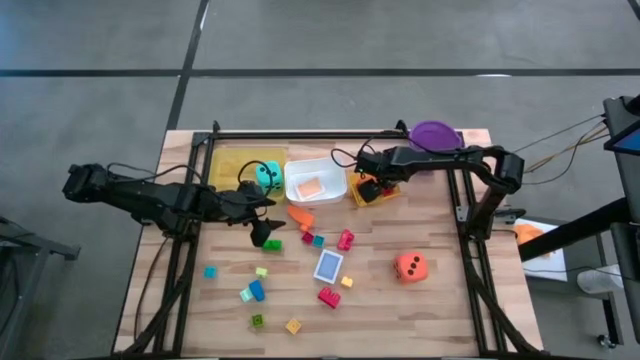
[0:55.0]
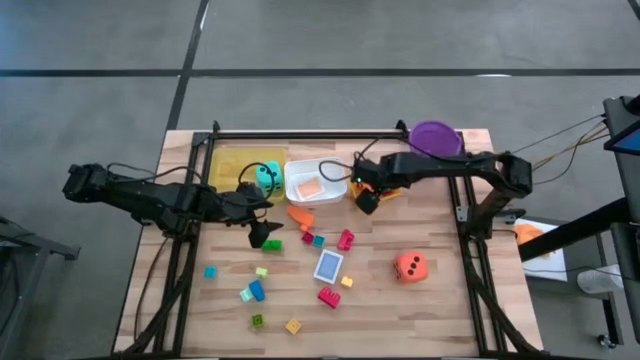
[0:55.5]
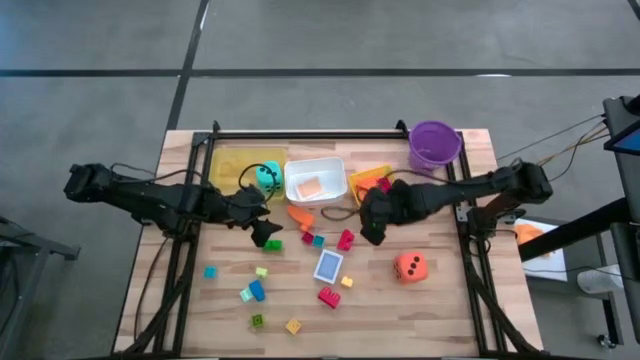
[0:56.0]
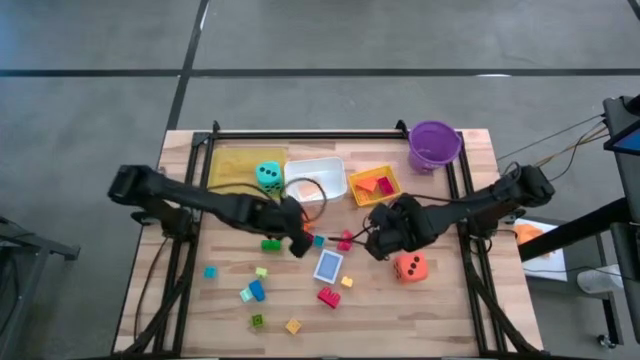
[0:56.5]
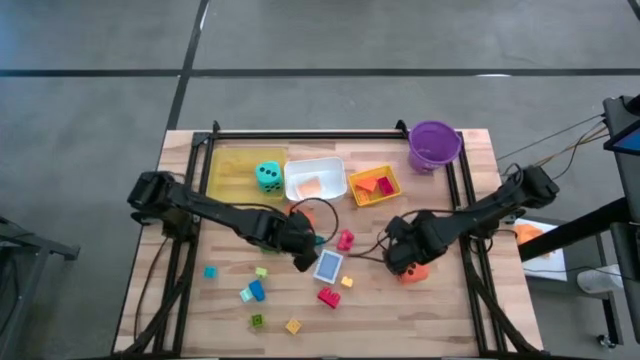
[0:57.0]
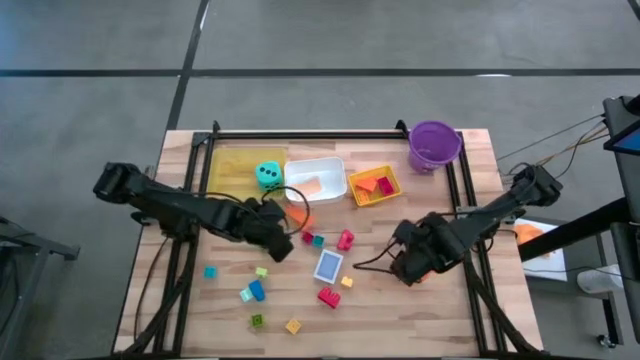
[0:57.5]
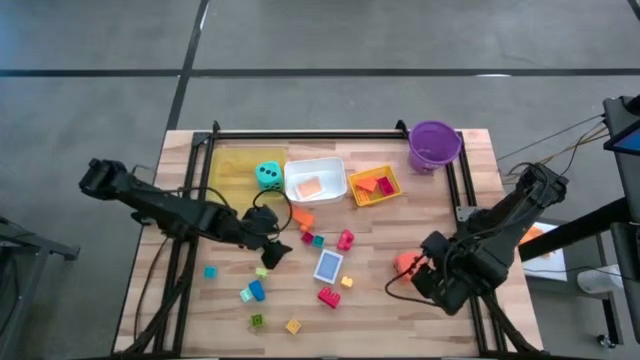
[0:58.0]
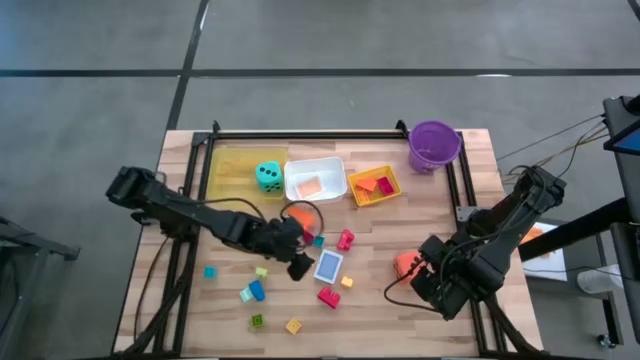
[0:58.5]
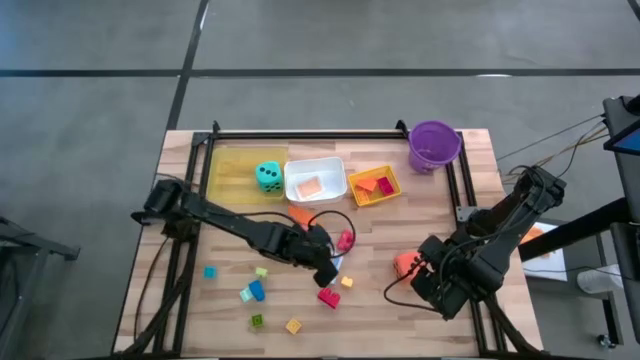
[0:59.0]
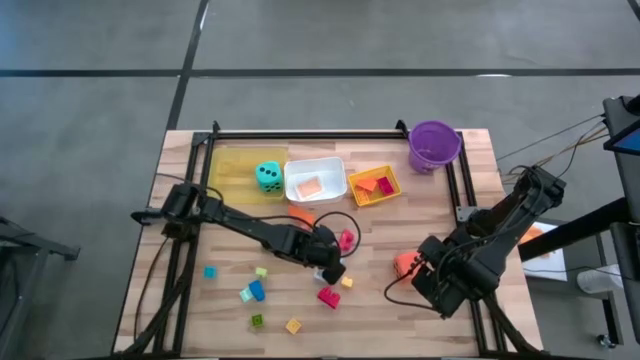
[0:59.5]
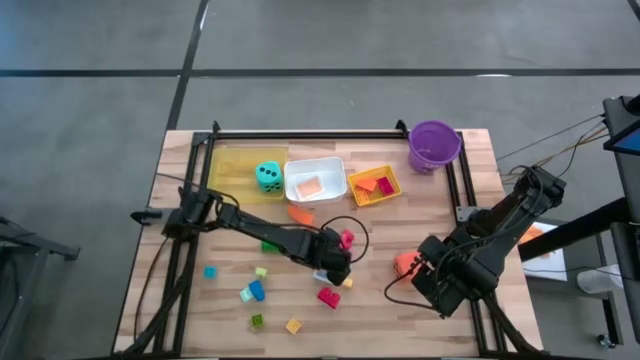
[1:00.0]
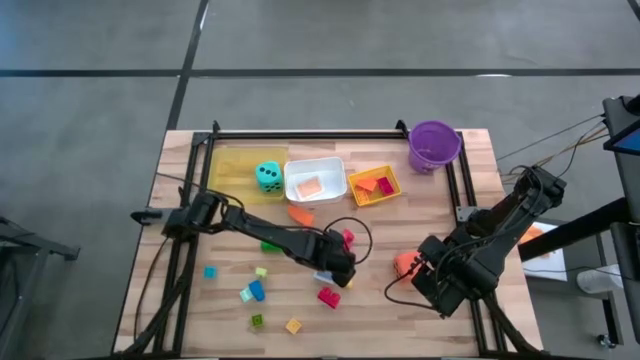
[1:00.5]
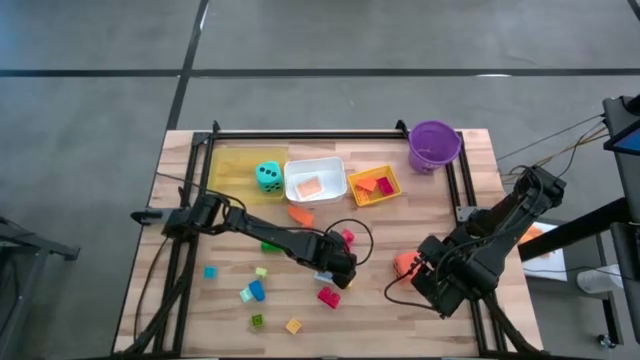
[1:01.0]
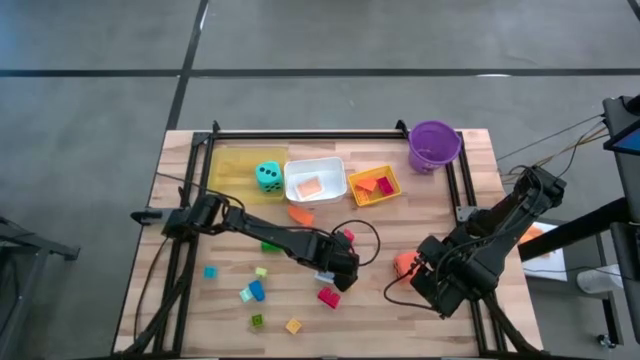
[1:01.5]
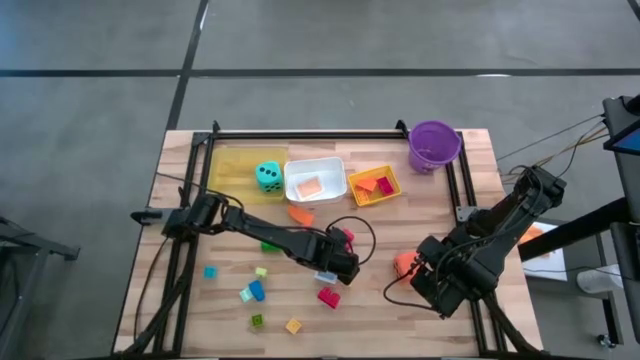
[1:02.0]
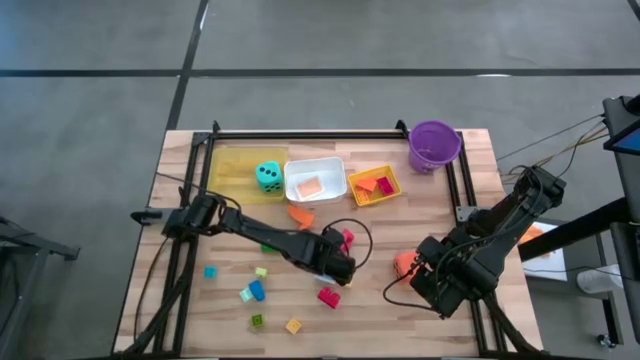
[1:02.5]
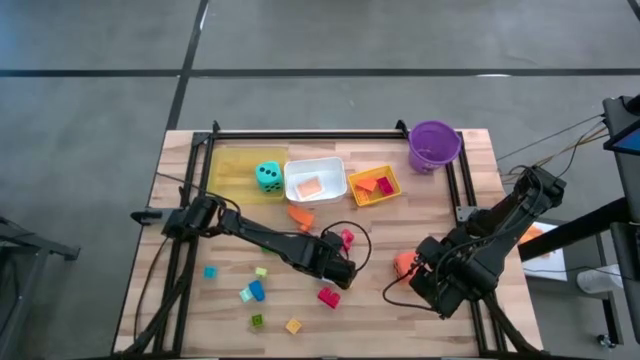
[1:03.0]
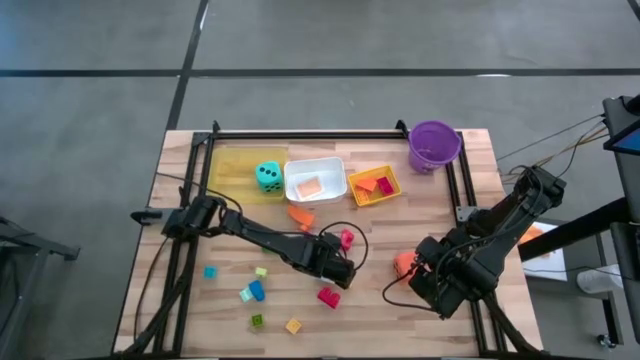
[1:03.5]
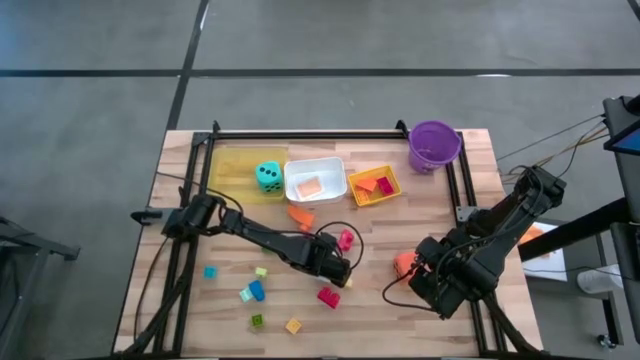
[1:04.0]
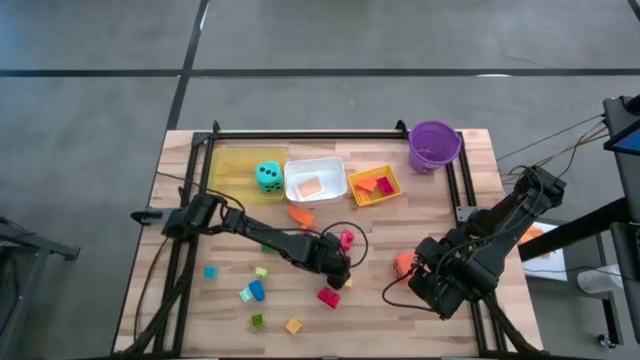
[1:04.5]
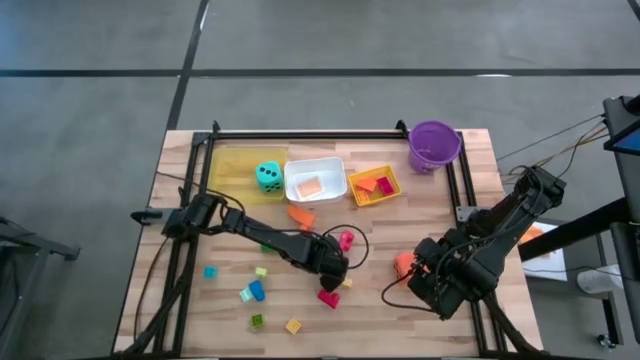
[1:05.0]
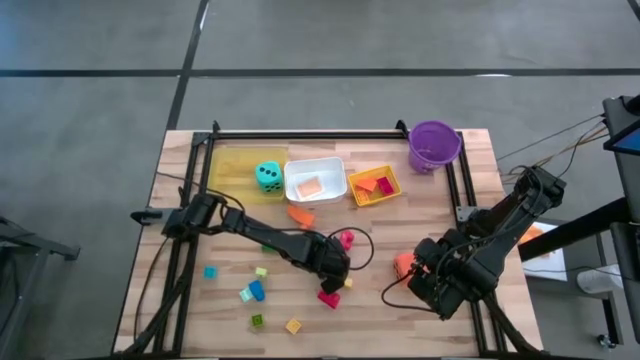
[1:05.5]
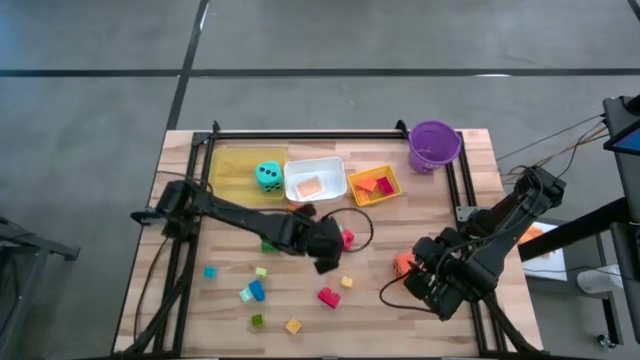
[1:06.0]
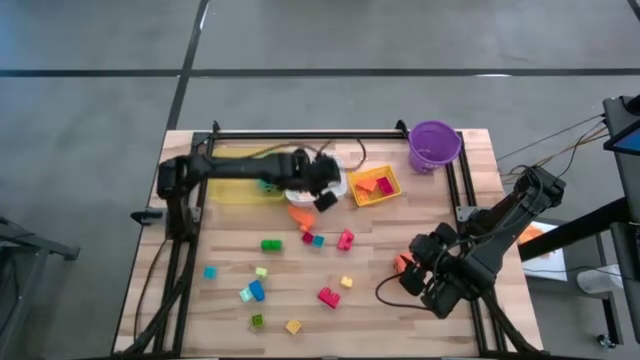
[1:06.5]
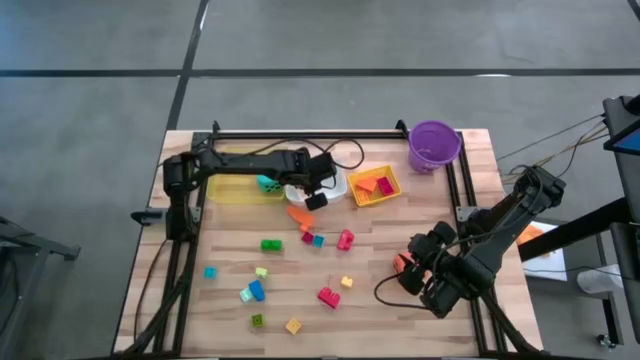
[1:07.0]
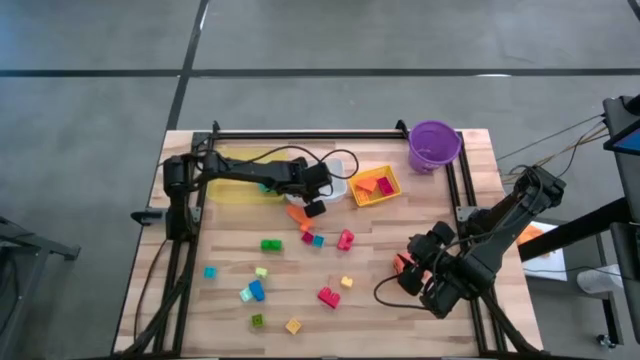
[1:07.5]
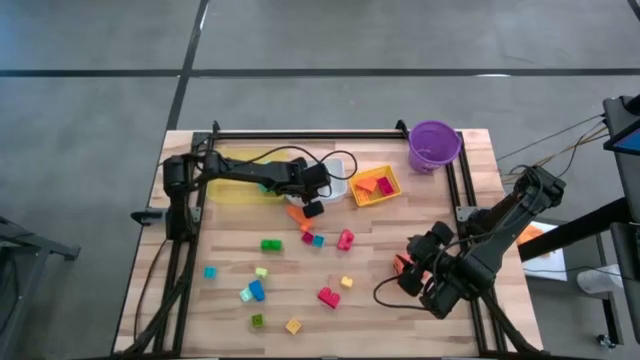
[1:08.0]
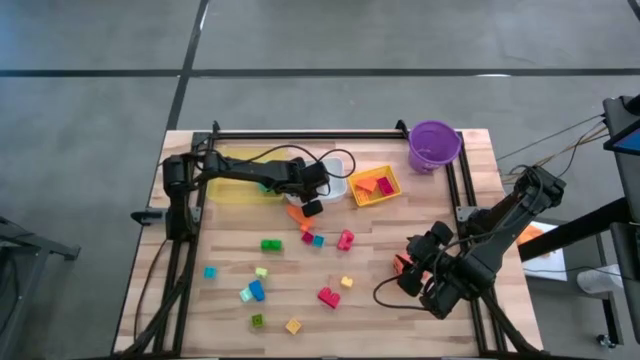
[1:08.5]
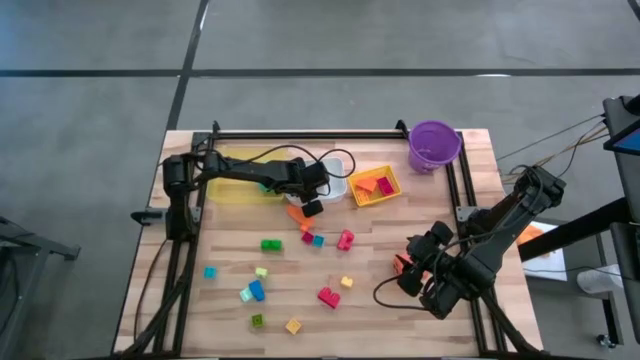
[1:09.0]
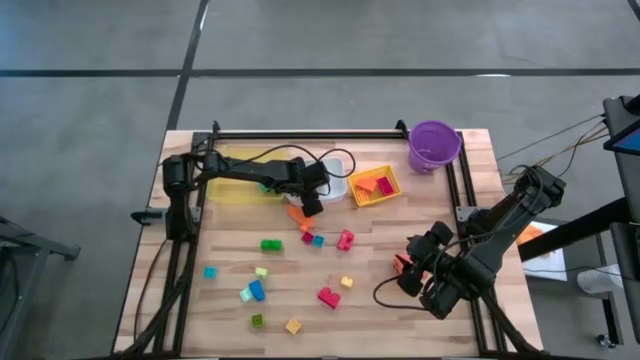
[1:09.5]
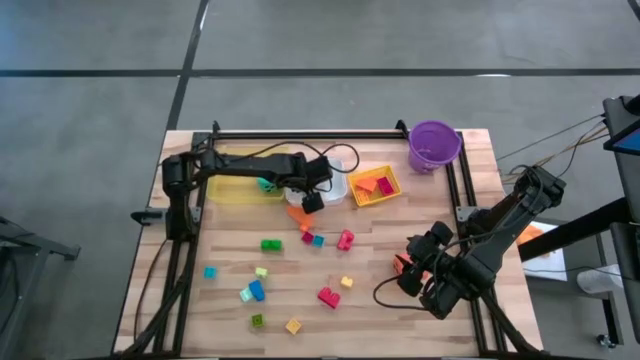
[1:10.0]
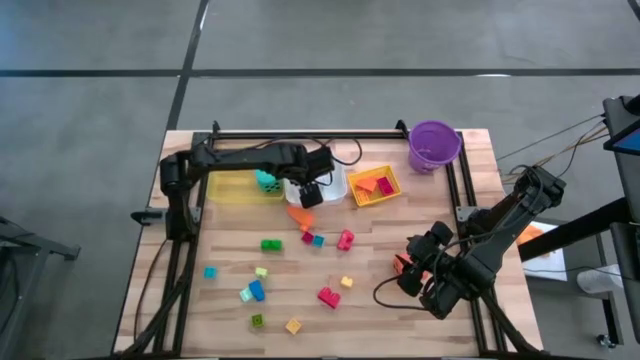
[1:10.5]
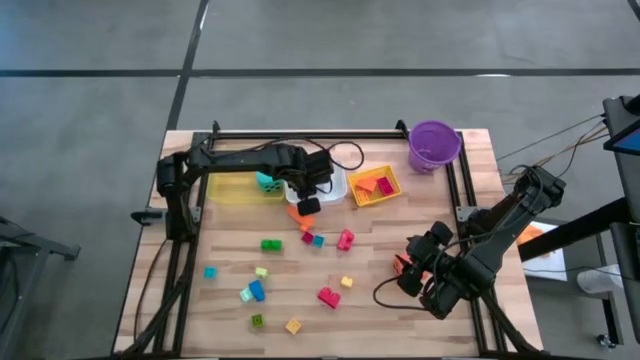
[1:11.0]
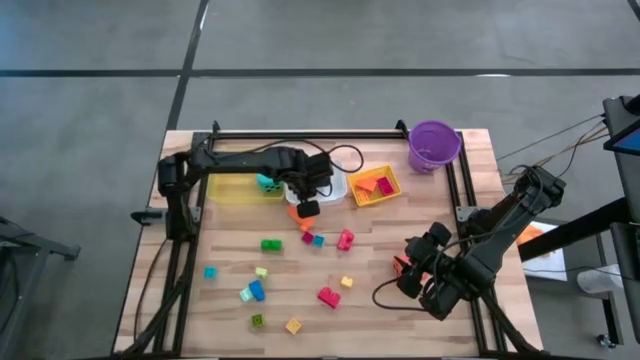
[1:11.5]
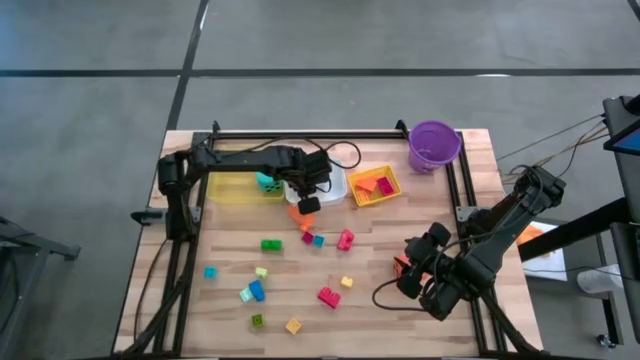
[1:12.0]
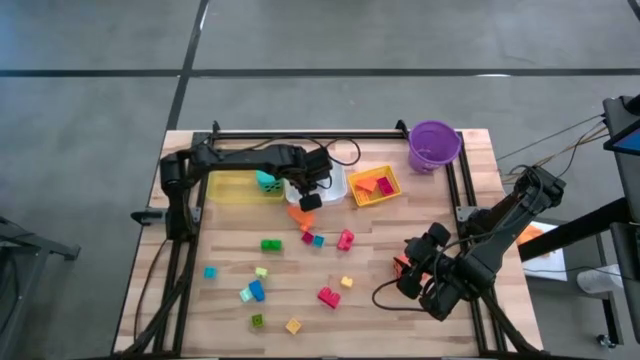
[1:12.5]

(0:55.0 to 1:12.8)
Task: Pick & Place Toys
Put the blue playing cards box into the white bin

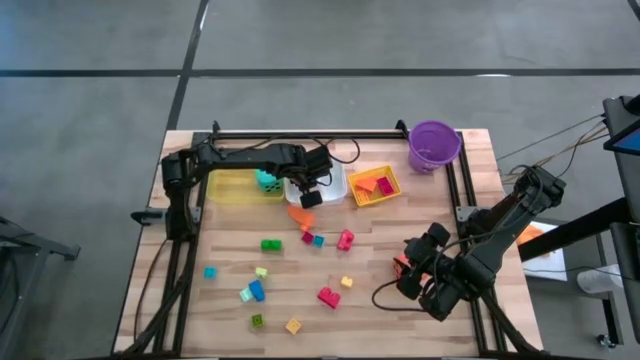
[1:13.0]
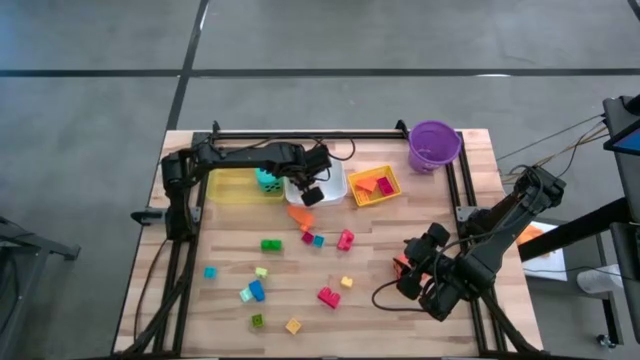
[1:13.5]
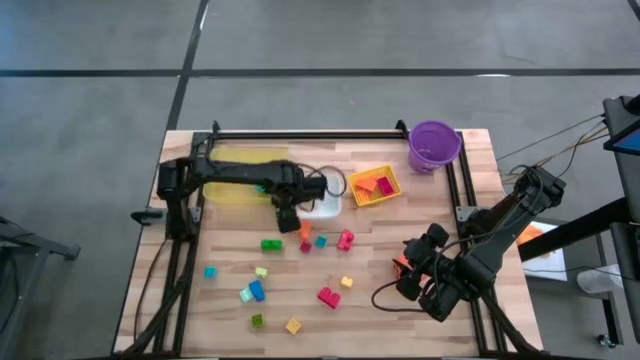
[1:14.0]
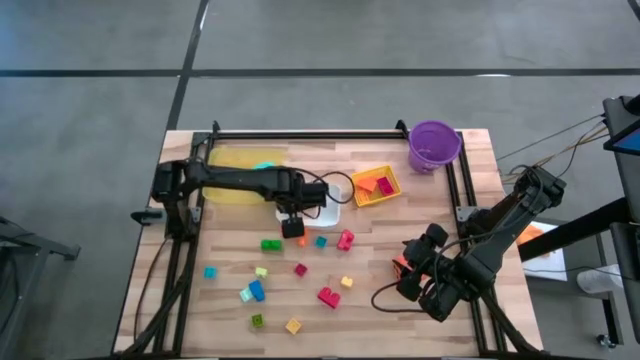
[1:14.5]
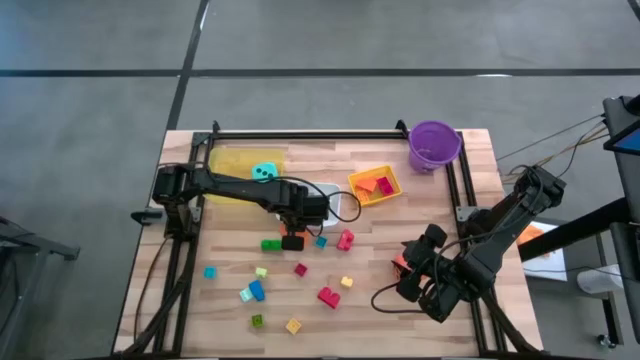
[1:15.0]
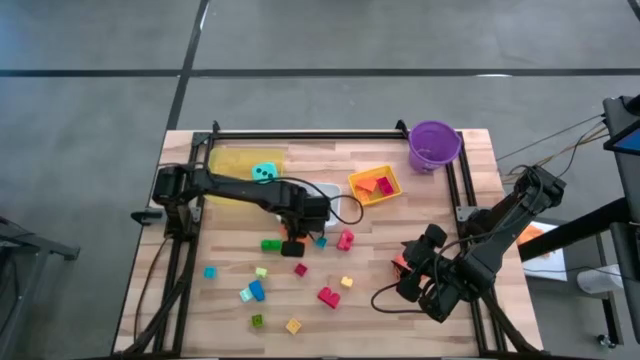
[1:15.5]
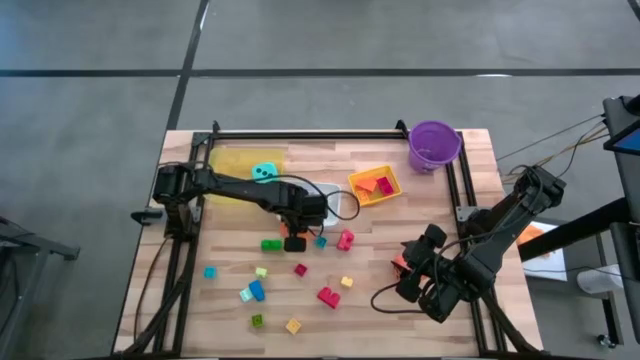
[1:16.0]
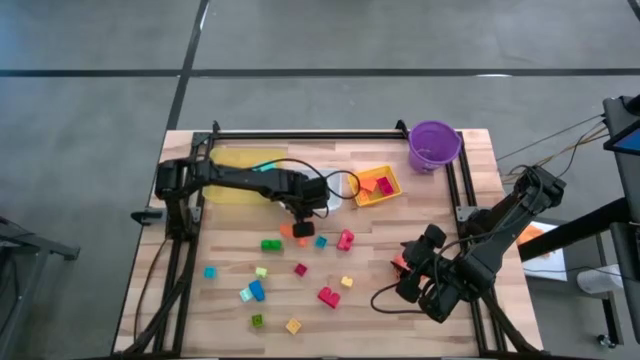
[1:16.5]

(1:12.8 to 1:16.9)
Adjust the white bin
